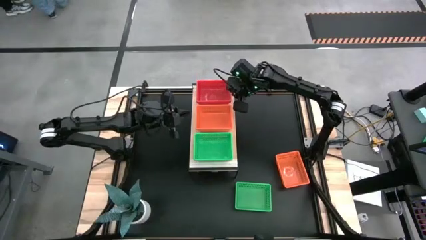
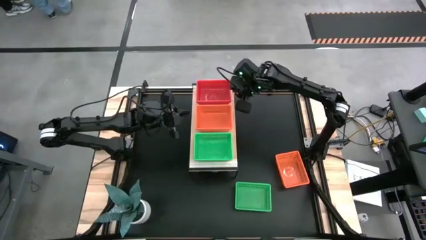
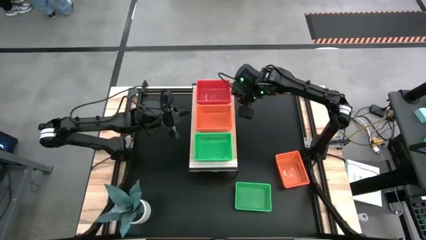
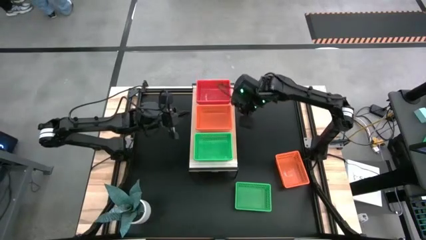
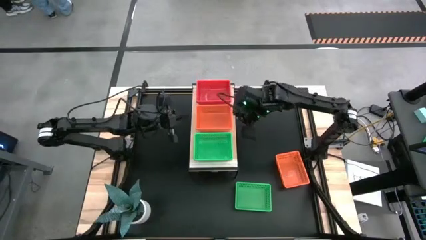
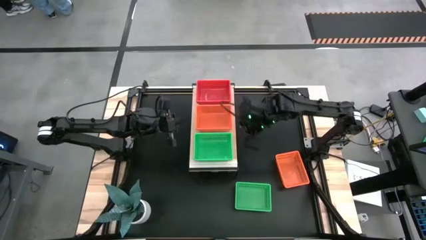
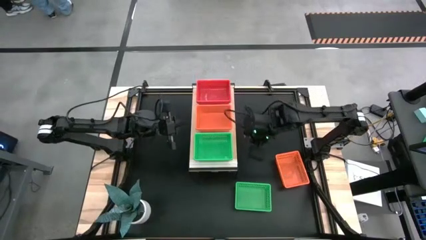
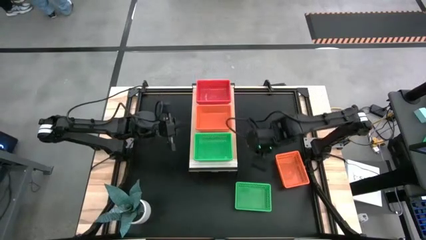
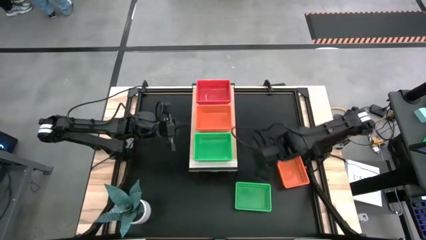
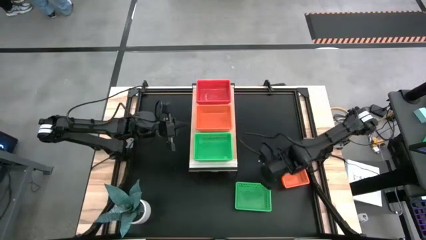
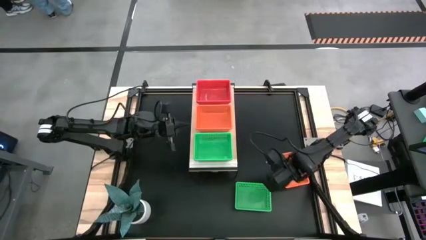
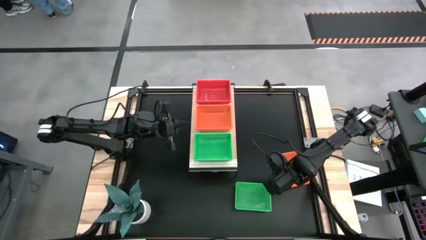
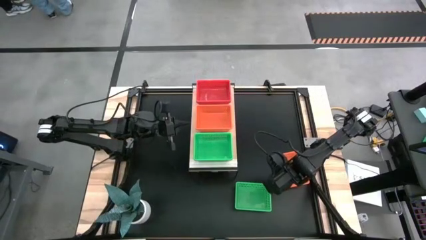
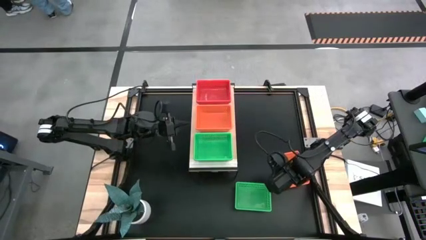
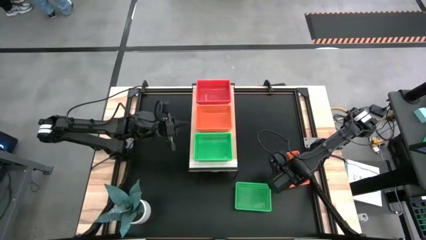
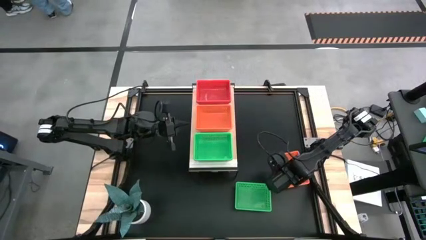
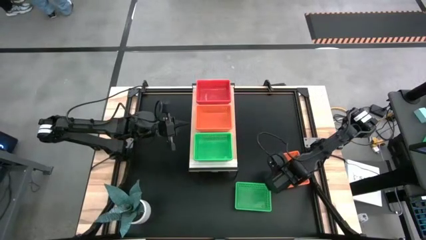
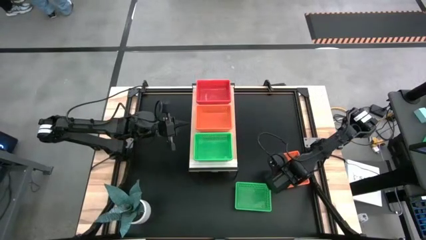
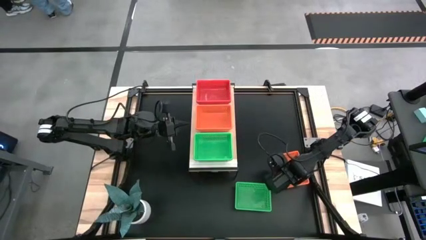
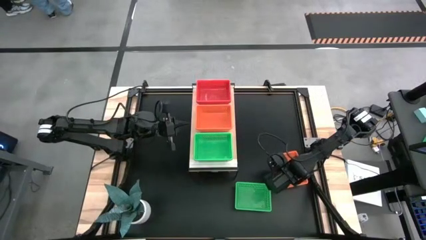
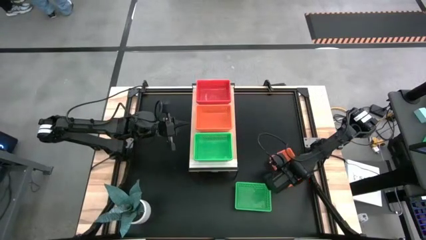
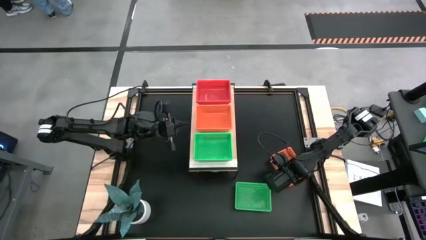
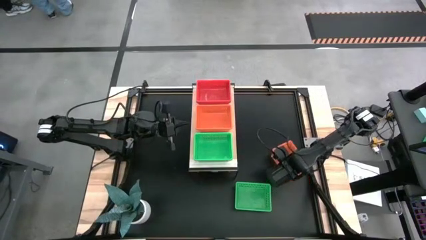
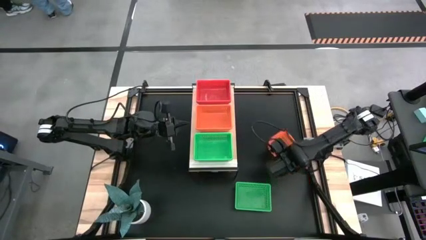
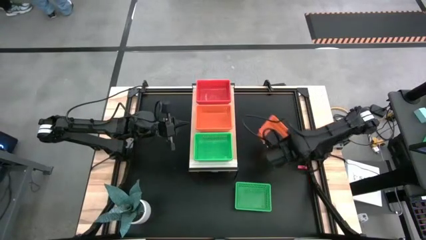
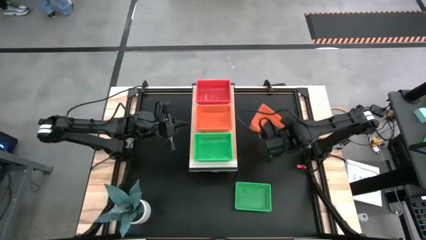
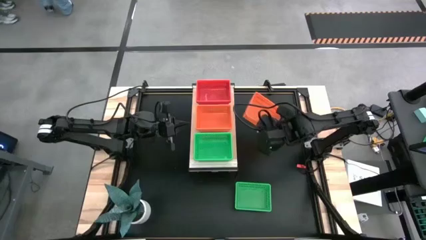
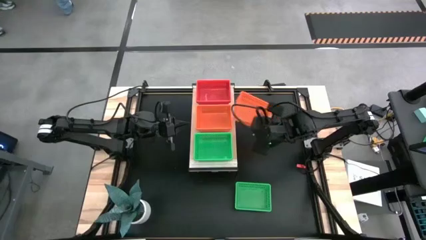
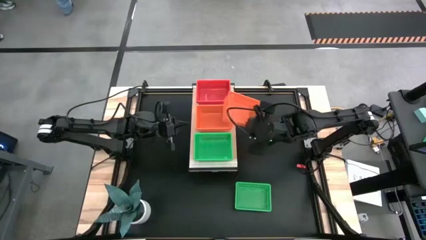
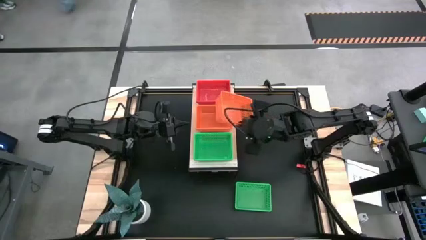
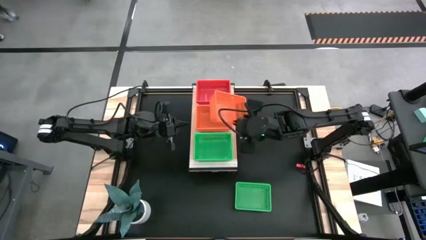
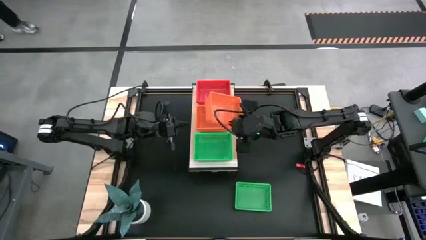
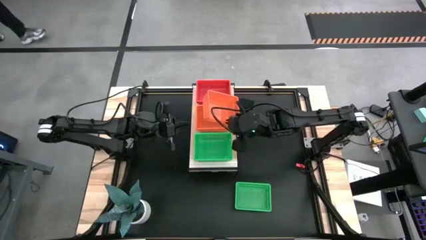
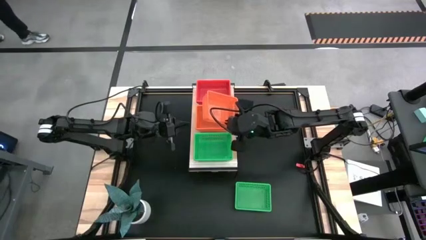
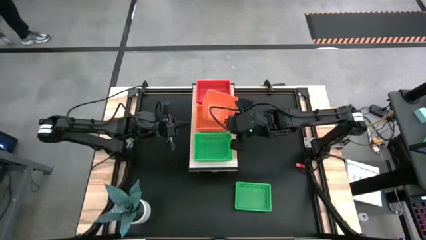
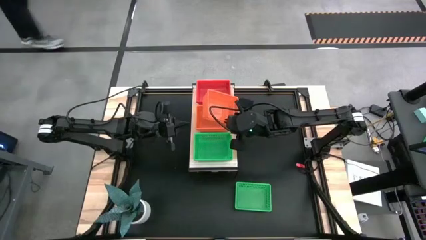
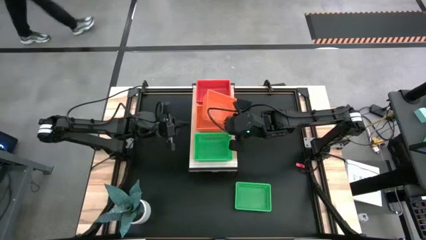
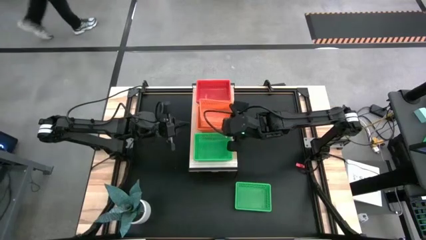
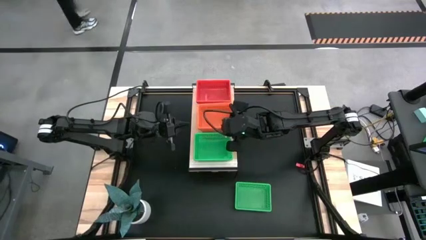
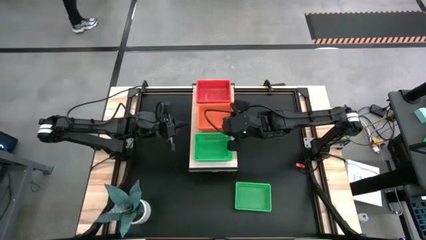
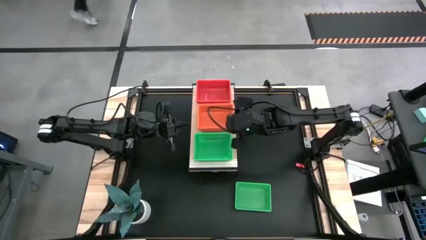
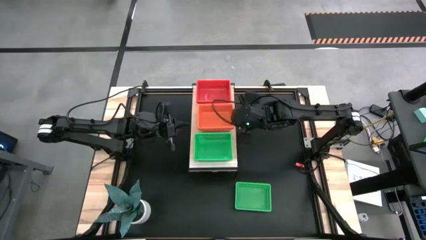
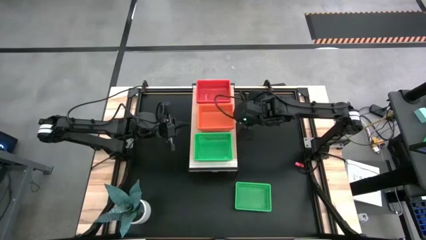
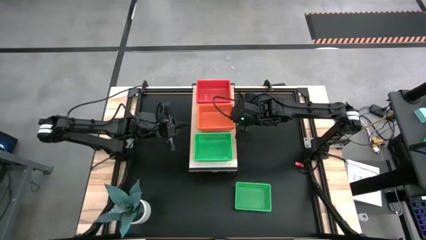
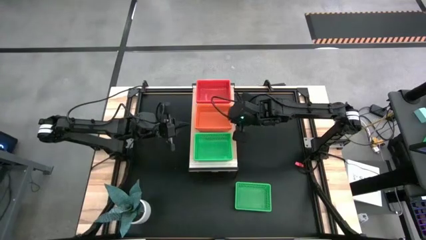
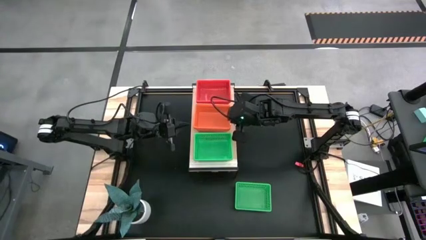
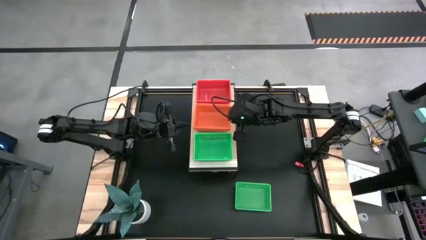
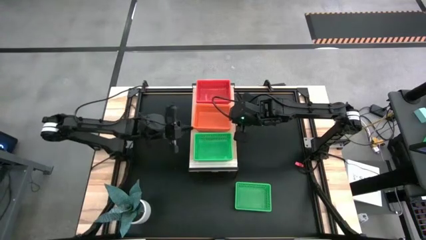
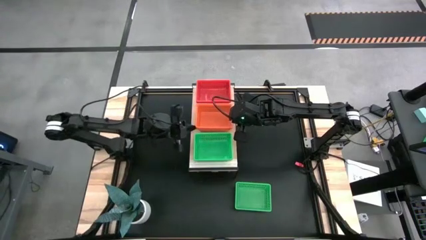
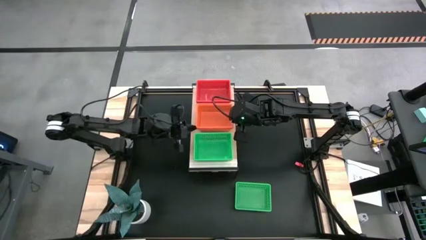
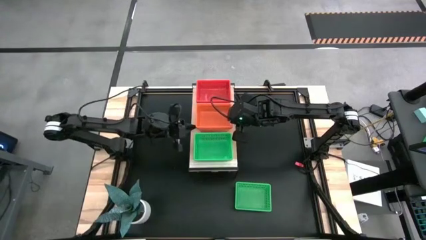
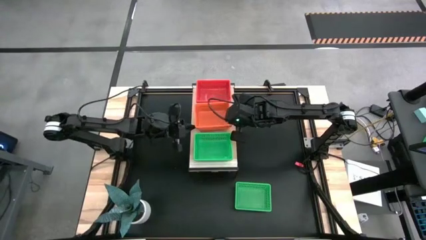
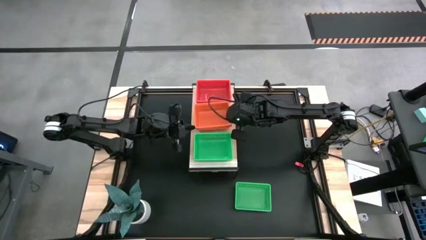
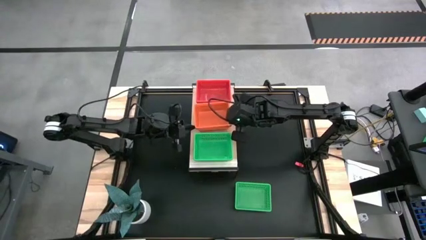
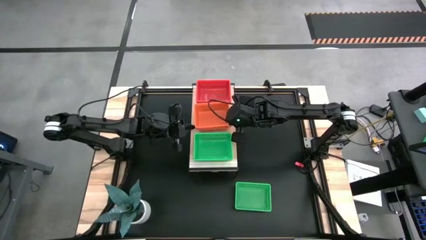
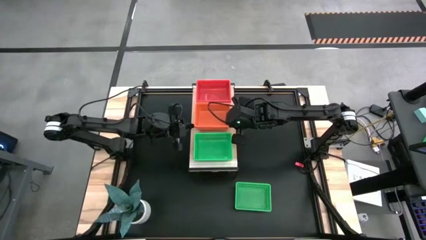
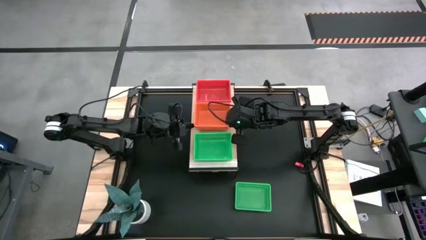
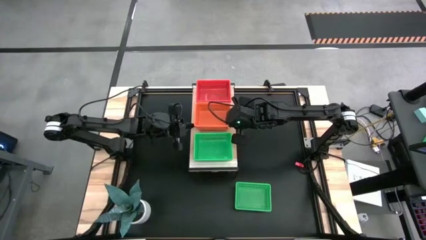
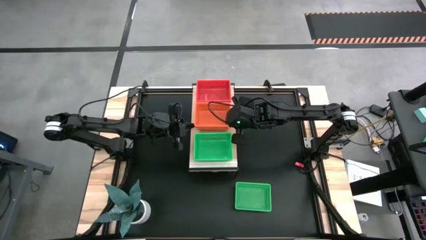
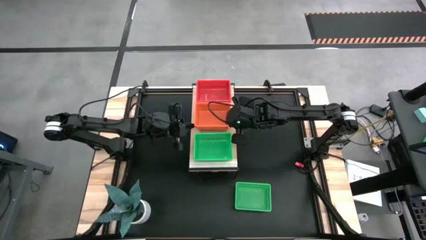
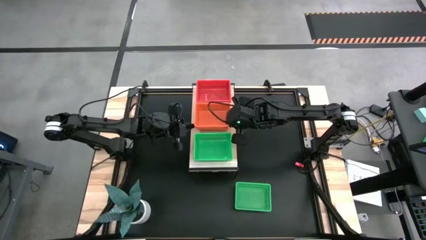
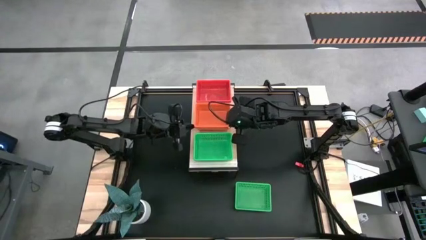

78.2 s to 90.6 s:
Task: Stack baskets on shelf by color
Stack the orange bin on the orange bins on the shelf
